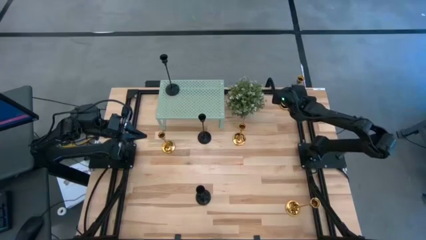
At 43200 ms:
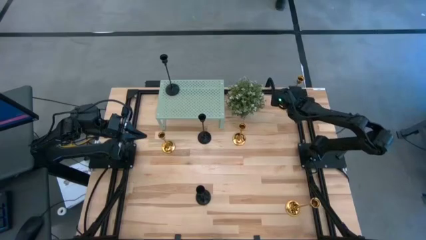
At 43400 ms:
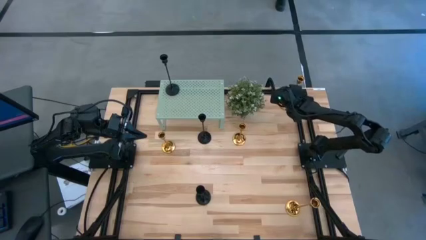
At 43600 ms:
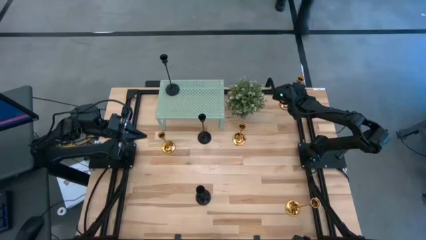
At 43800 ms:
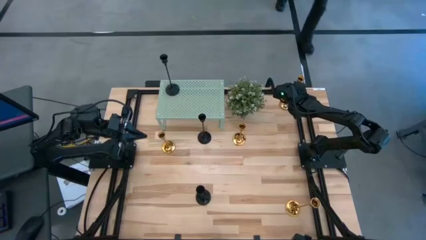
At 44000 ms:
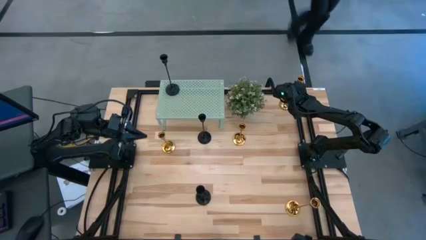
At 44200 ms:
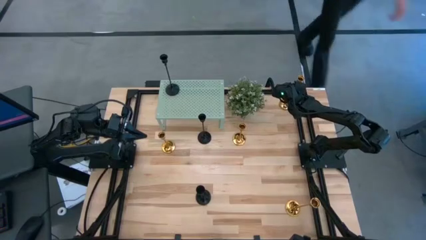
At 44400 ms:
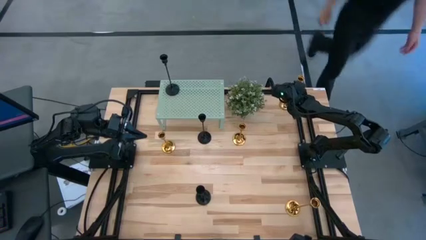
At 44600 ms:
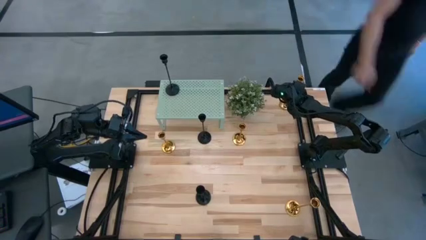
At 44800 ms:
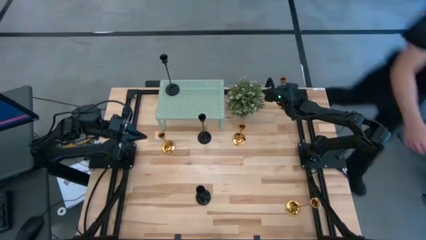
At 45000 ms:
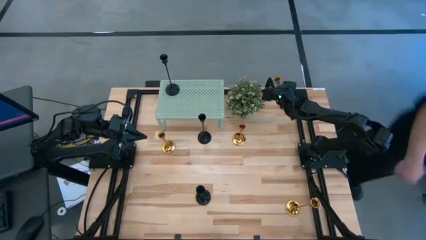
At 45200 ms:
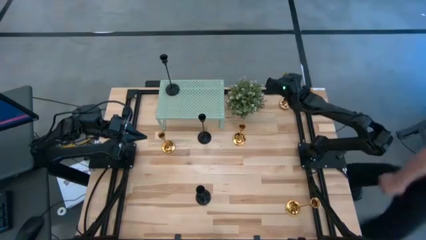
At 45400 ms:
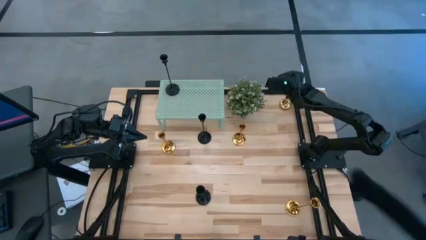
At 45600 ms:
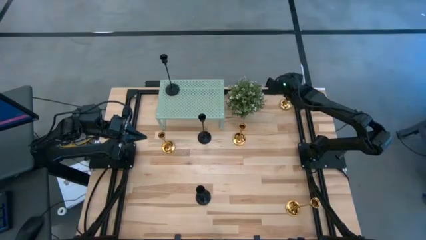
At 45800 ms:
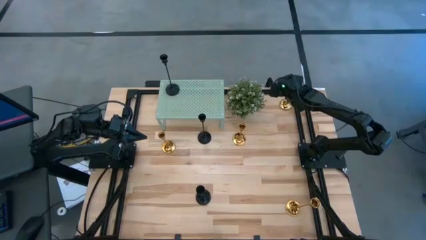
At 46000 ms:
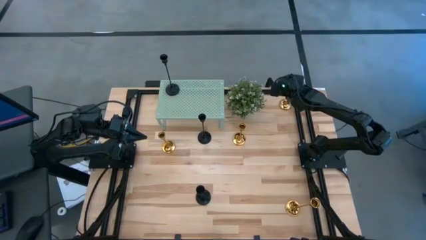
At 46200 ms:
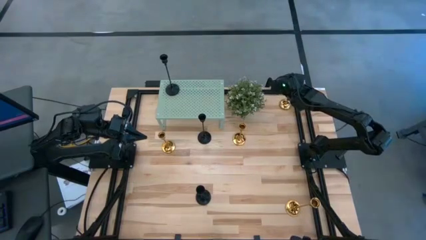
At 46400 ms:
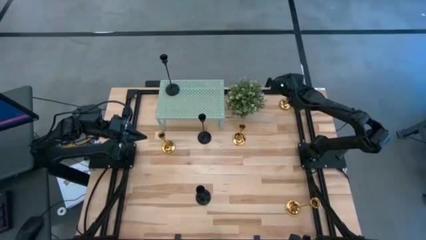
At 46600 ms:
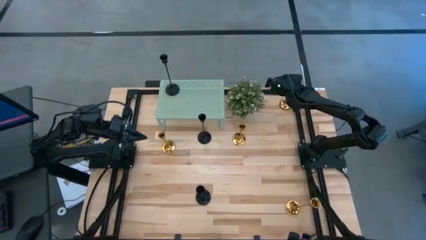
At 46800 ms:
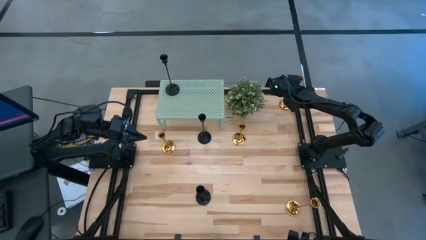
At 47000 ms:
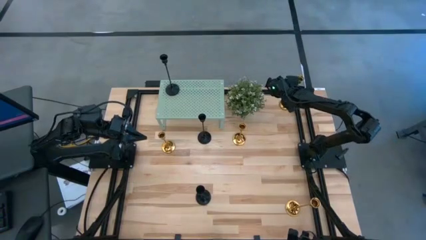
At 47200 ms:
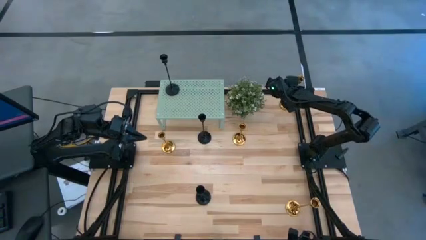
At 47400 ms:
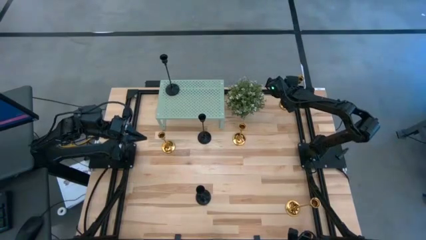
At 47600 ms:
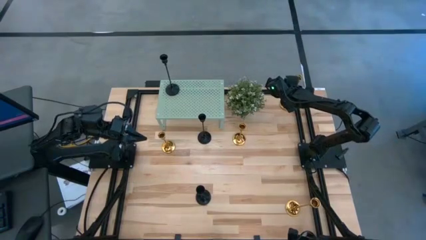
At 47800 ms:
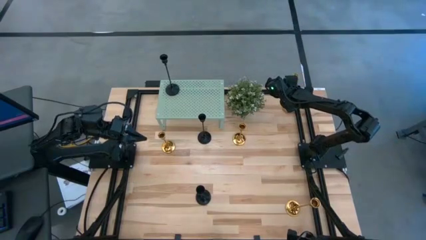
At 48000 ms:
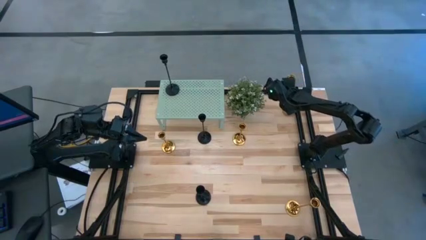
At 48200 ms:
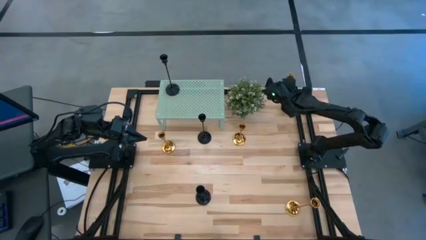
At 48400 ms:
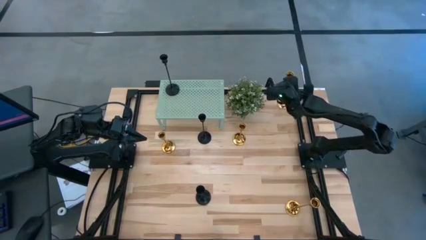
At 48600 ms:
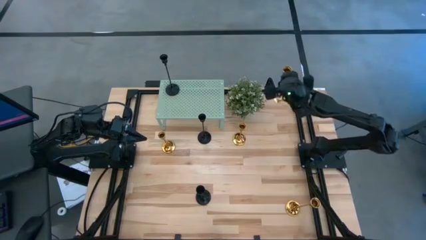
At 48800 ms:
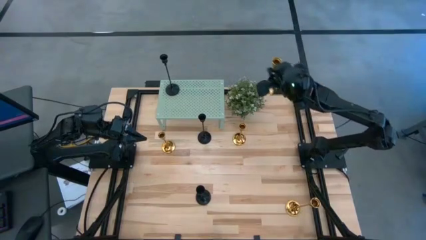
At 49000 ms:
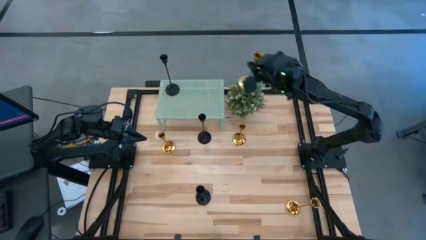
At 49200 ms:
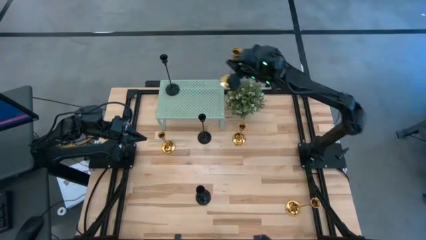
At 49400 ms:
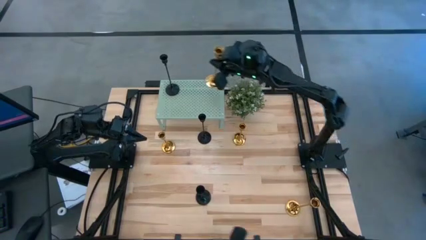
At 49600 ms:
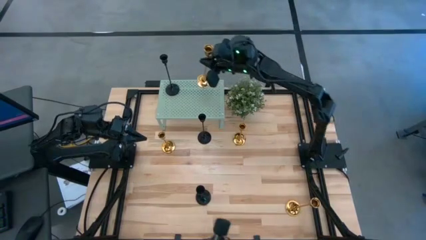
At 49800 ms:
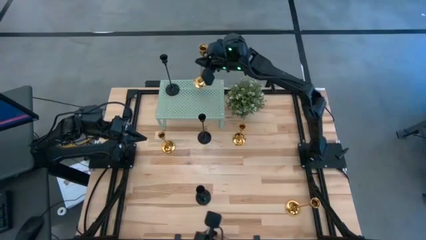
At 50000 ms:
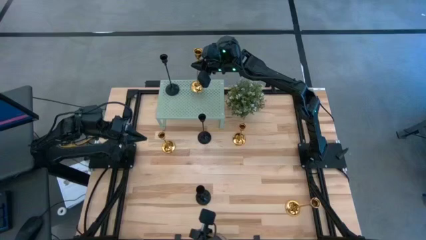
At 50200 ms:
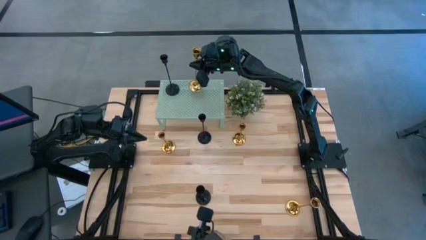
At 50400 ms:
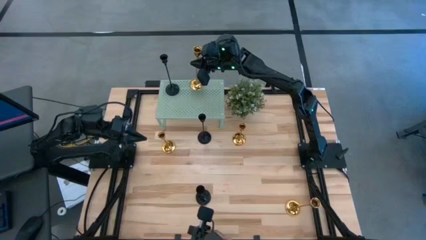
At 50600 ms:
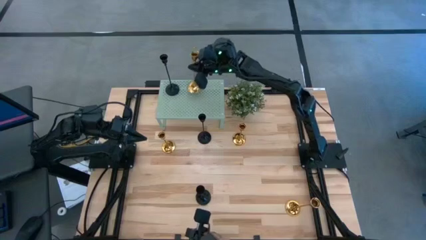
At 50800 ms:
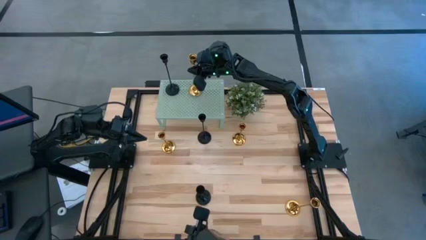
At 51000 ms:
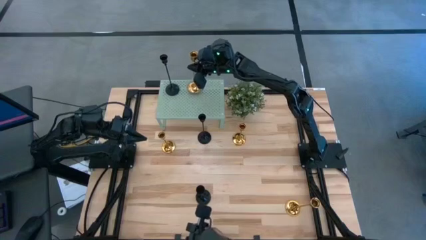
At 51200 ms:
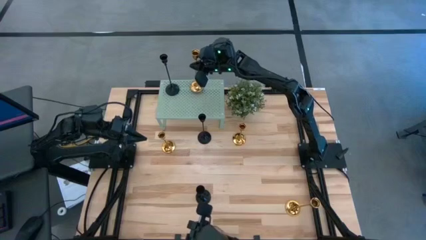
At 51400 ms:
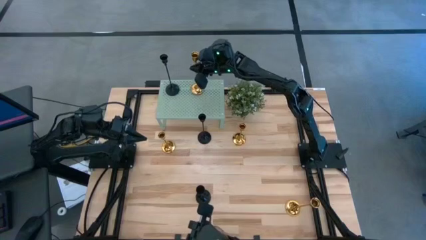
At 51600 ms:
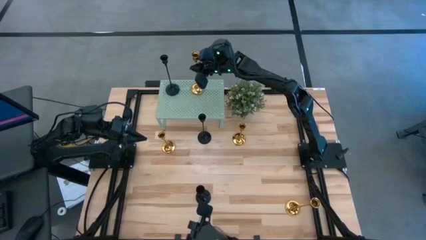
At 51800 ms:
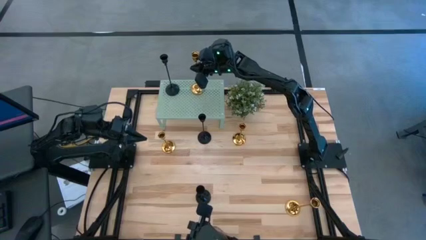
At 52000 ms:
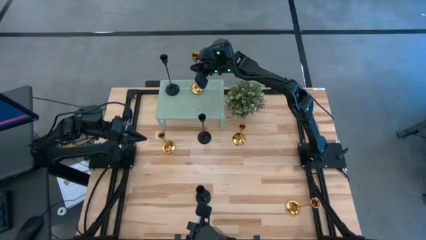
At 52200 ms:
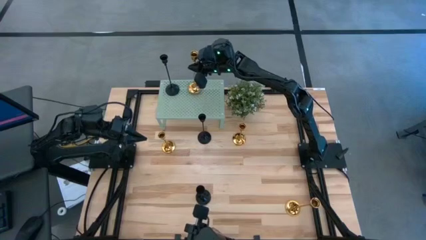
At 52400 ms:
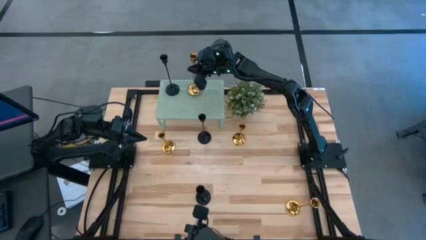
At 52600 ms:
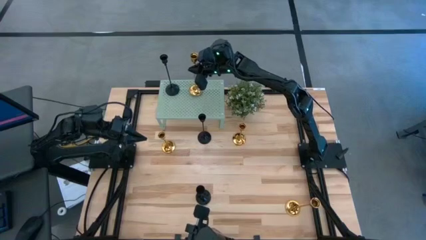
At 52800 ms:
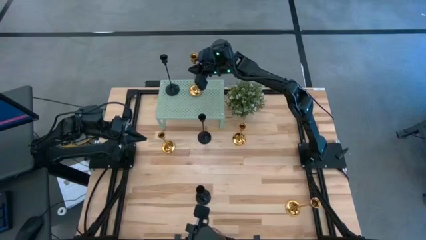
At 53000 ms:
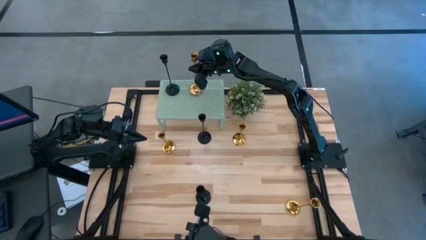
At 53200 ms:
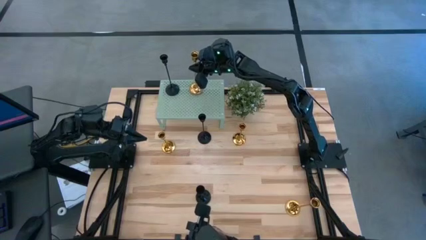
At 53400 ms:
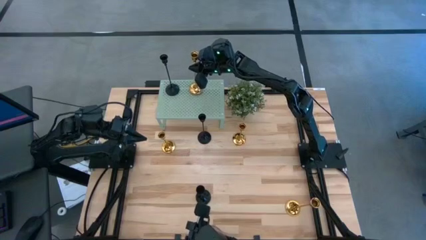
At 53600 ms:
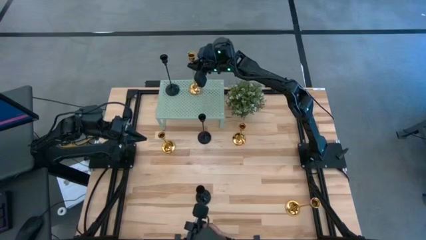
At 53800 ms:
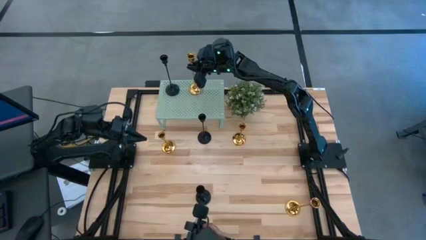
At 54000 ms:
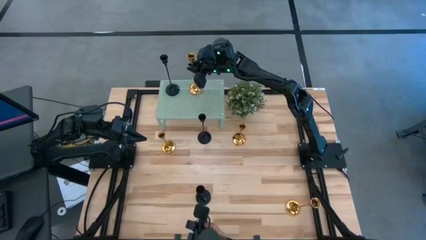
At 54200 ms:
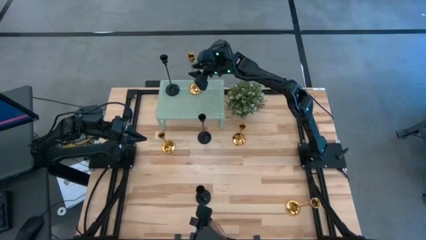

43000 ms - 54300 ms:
Task: Pick & Place candle stick holders
Put the gold candle holder on the shelf aligned with the black candle holder

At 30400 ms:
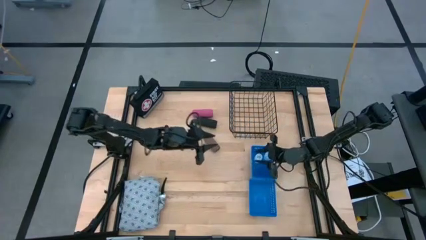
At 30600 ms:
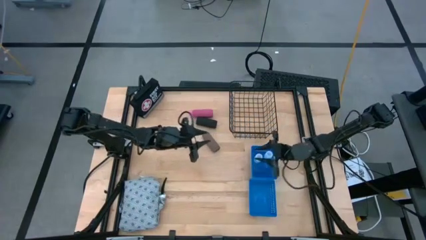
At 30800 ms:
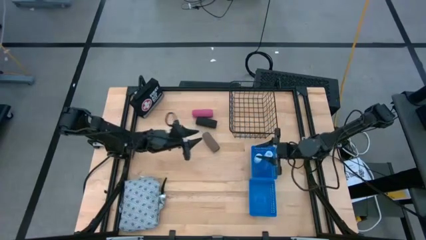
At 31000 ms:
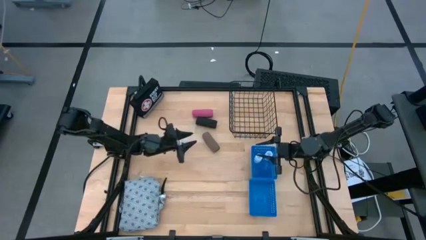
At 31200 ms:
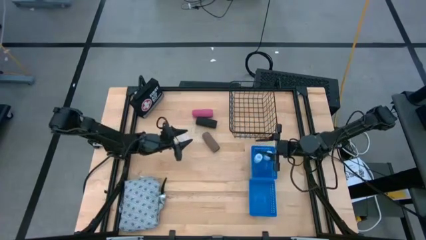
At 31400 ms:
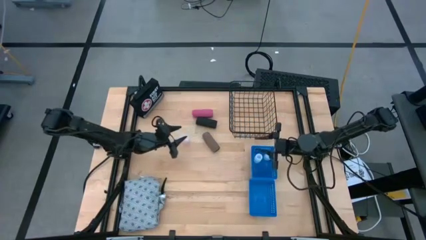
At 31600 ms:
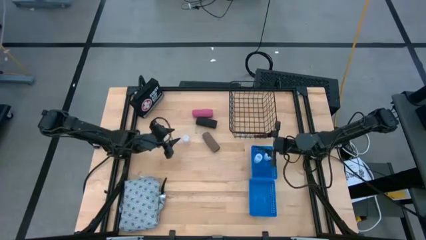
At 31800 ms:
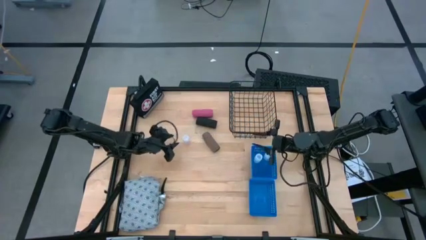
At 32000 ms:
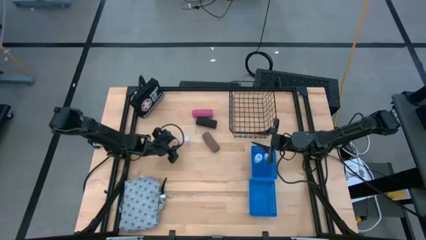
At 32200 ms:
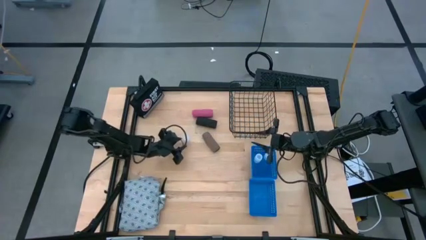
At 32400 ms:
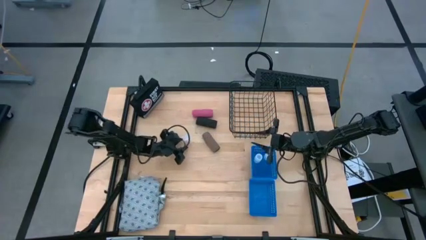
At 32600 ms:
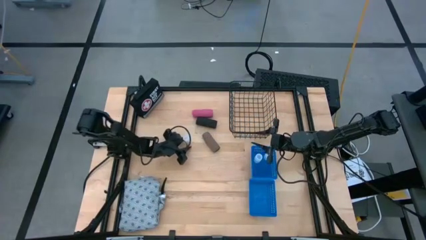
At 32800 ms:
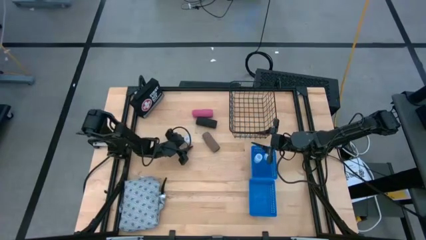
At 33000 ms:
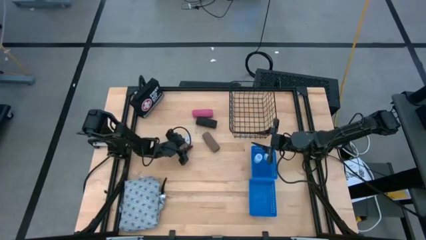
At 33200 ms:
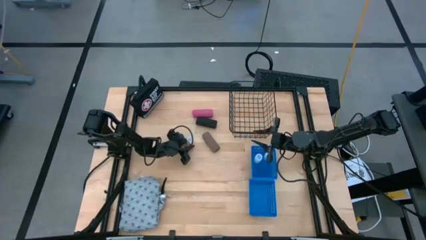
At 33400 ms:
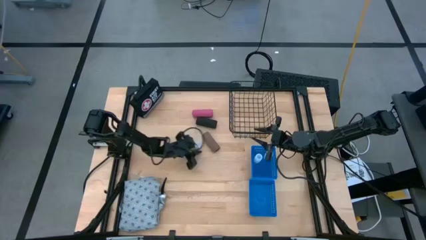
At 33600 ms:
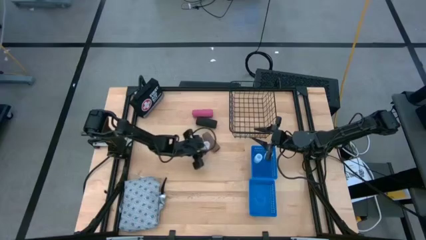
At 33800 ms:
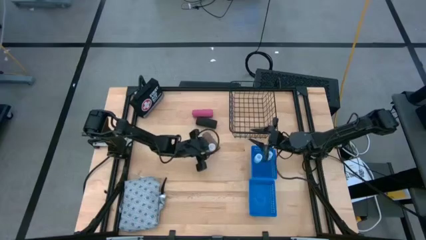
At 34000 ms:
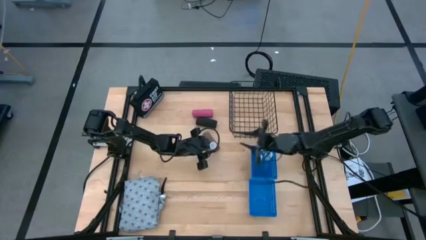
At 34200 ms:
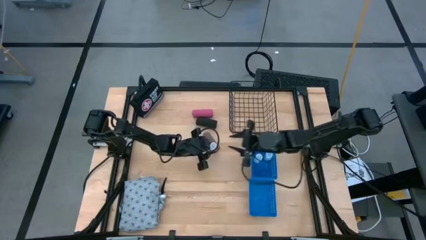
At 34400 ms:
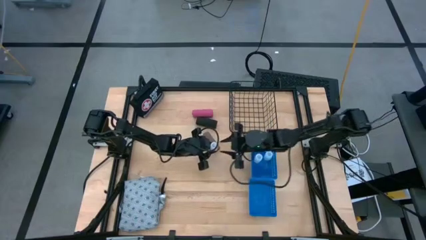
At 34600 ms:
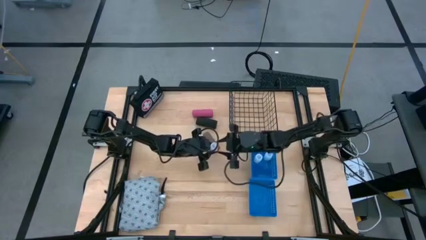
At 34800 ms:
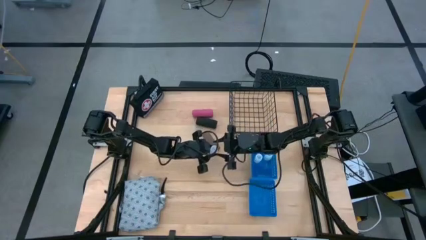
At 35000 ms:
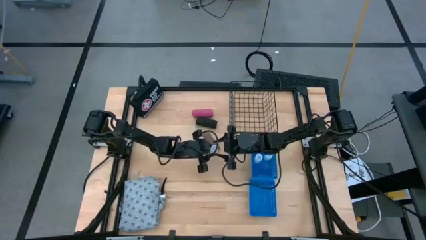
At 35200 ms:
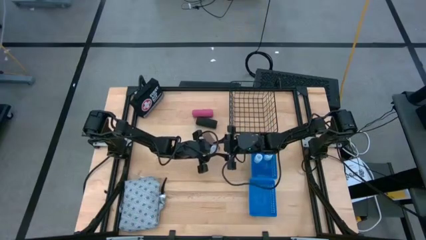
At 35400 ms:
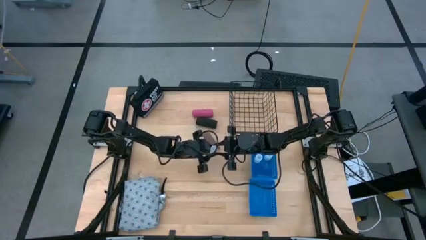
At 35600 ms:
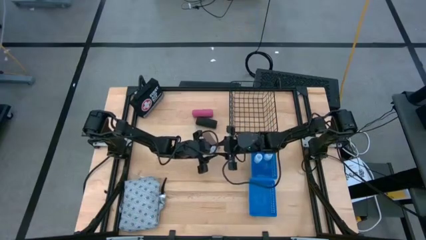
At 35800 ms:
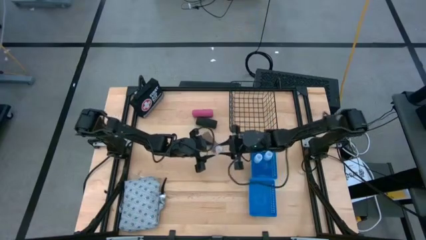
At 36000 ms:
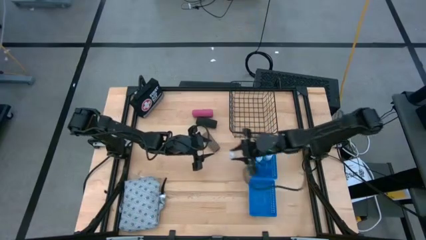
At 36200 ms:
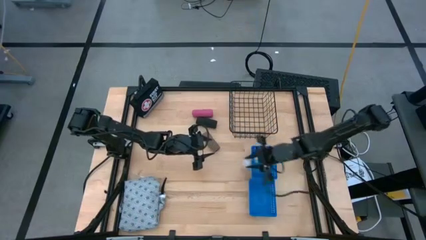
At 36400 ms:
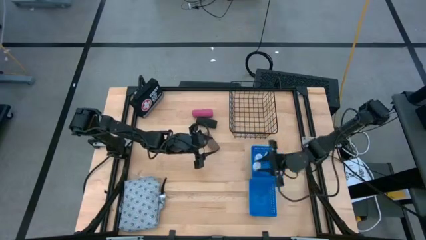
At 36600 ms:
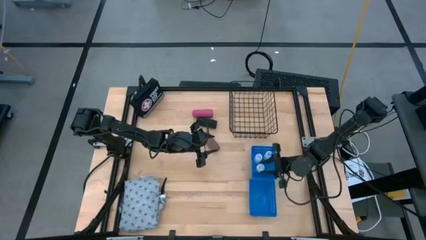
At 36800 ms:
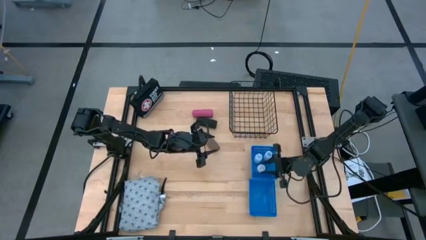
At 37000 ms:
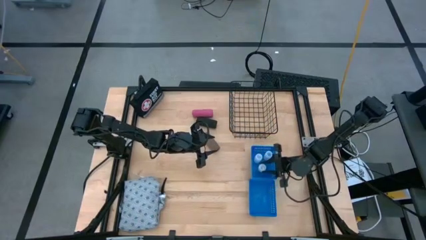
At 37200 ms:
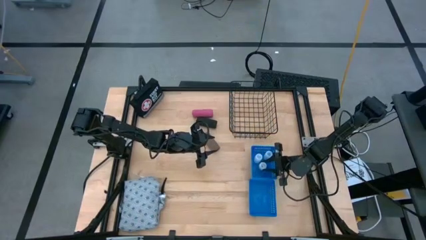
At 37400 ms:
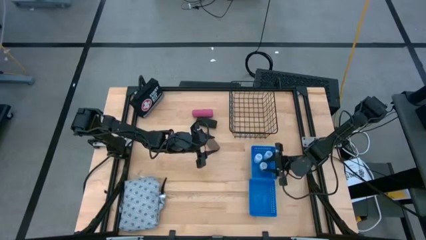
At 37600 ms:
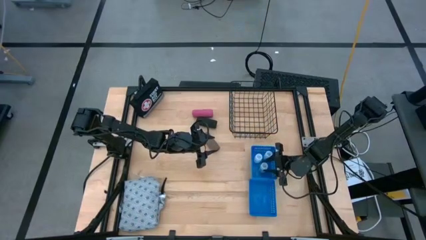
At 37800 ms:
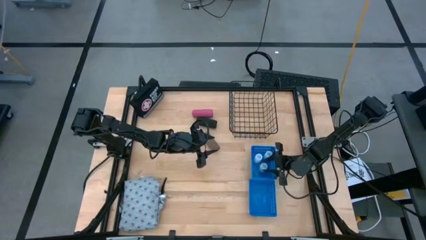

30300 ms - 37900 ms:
Task: Pick & Place Medicine items
Put the transparent pill bottle into the top blue basket
